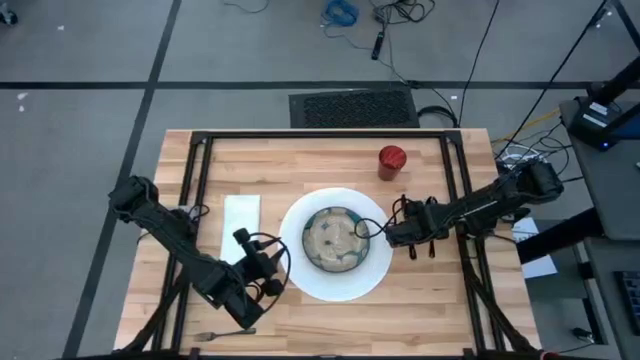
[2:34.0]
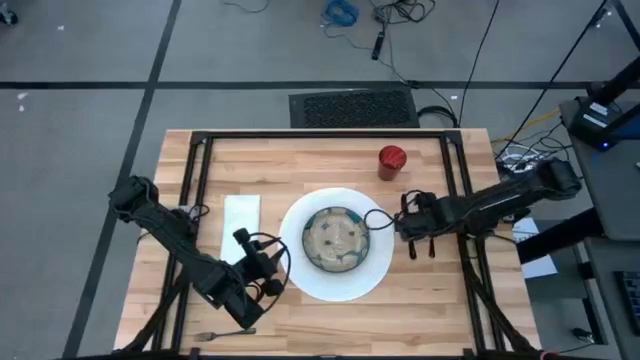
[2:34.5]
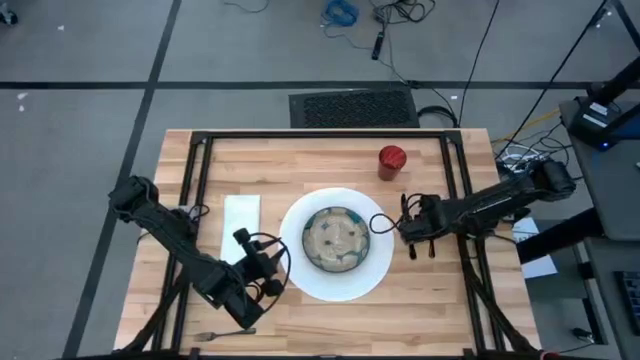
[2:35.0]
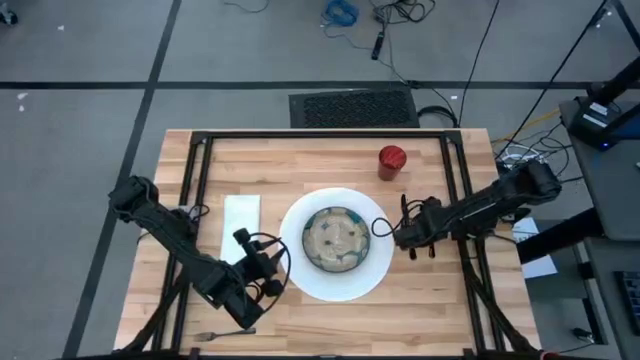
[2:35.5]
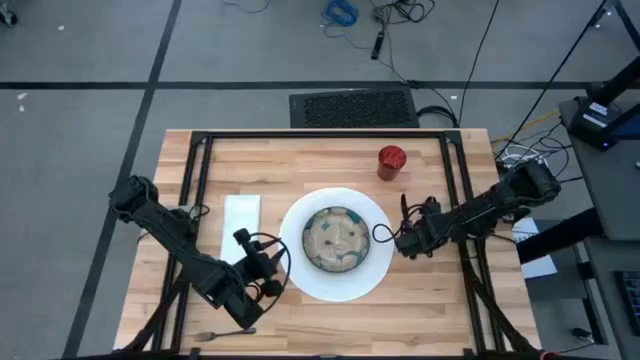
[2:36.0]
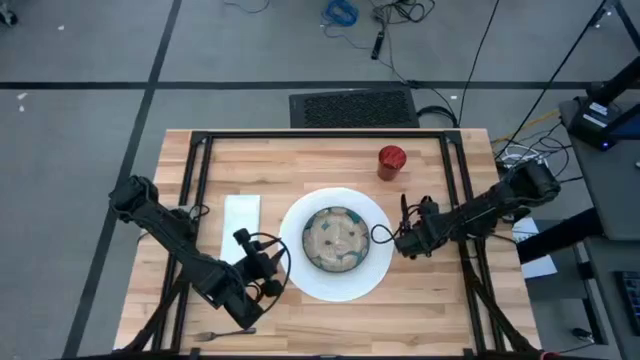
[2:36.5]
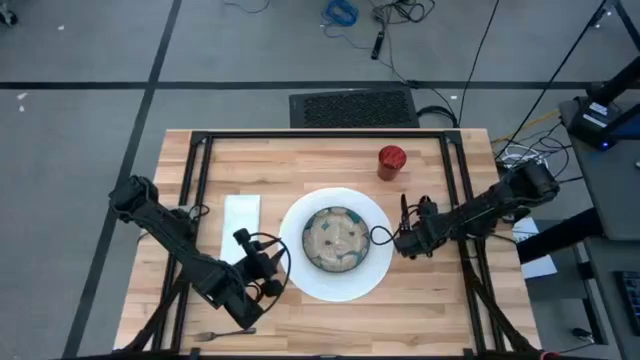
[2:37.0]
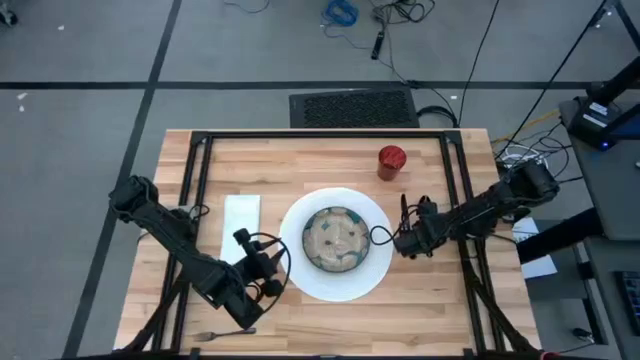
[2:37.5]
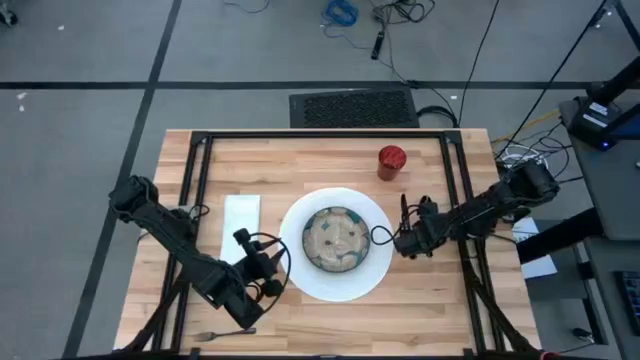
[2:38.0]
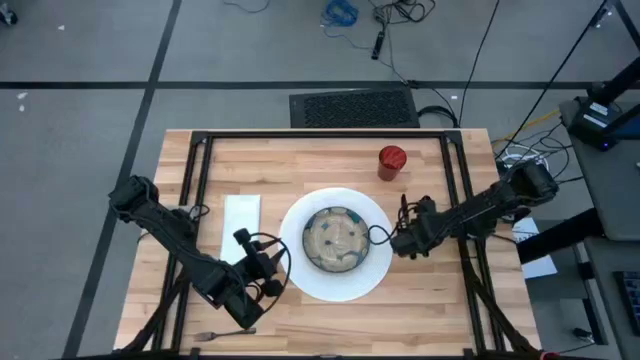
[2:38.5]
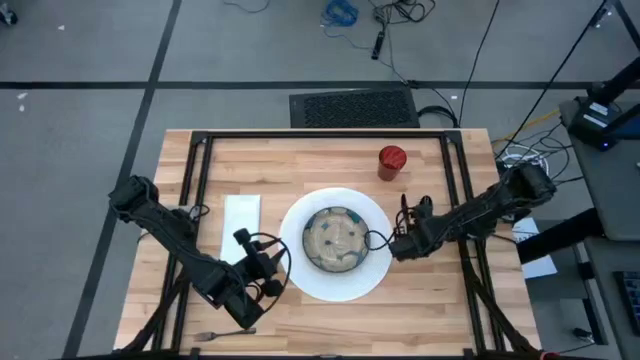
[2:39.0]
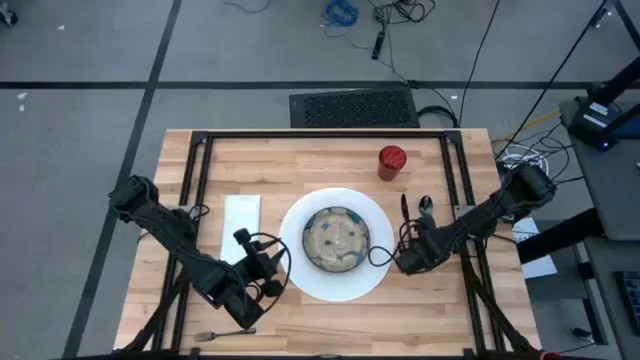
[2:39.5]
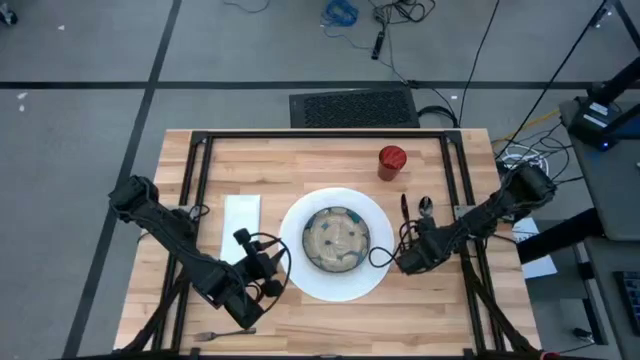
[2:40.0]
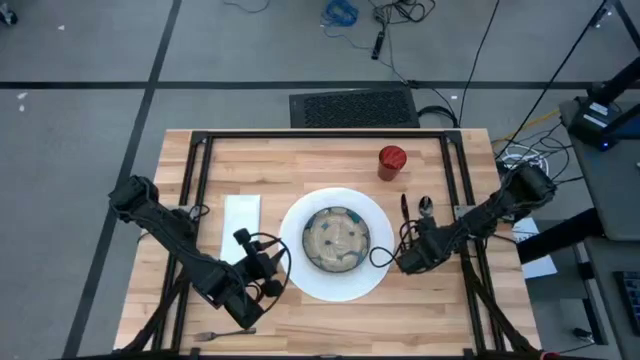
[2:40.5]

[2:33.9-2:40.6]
Task: Set table place
Adjust the black spoon

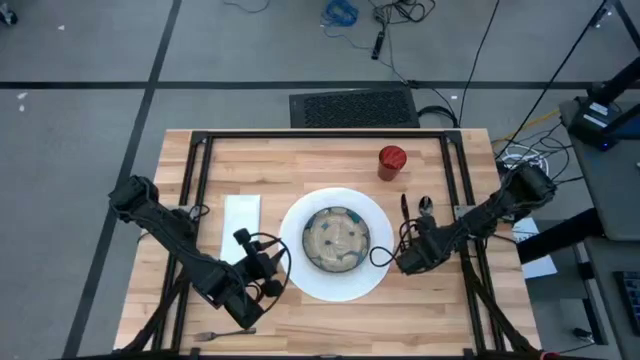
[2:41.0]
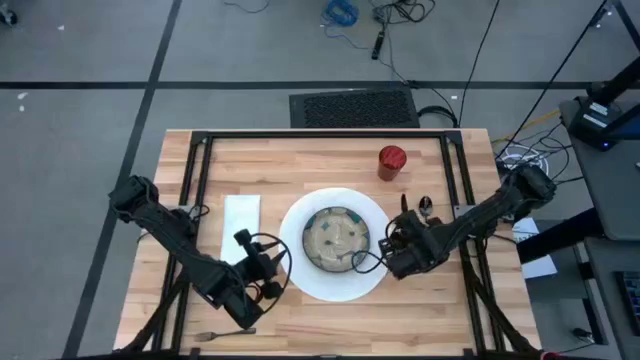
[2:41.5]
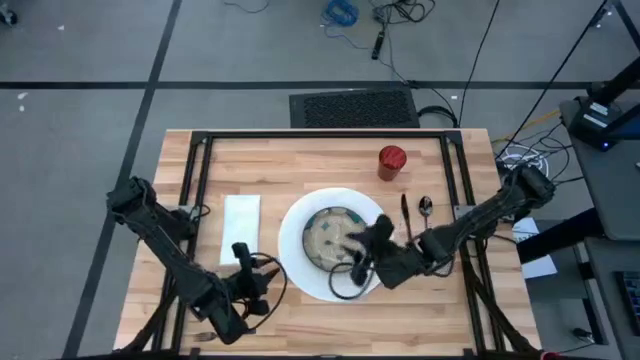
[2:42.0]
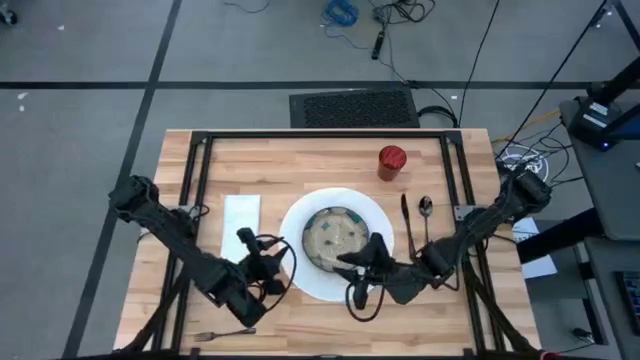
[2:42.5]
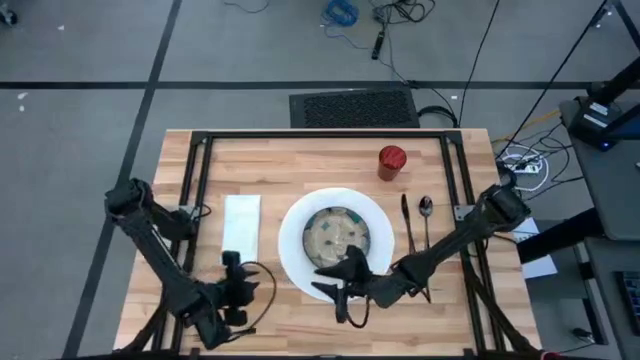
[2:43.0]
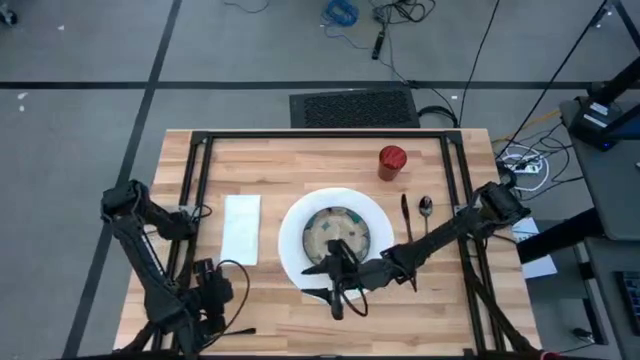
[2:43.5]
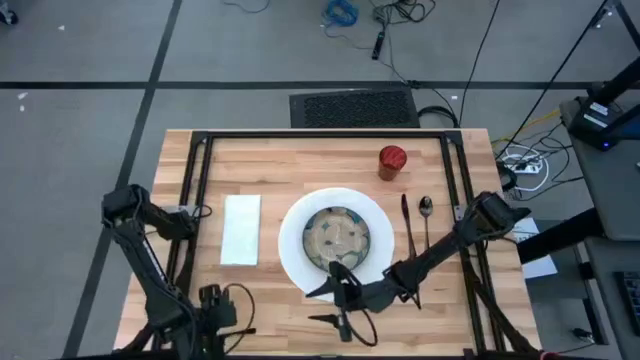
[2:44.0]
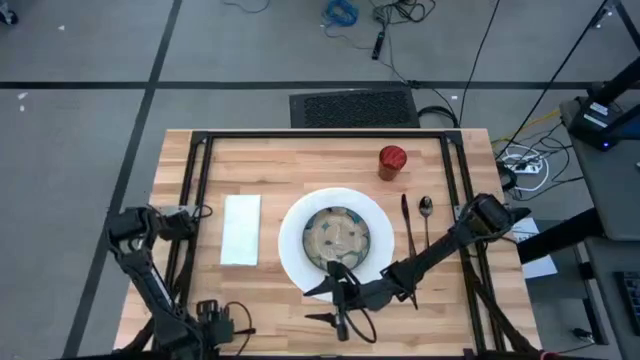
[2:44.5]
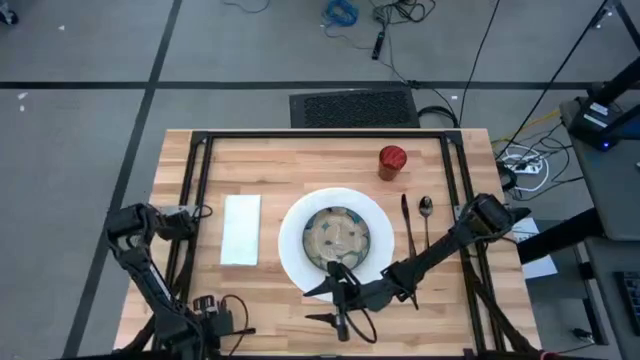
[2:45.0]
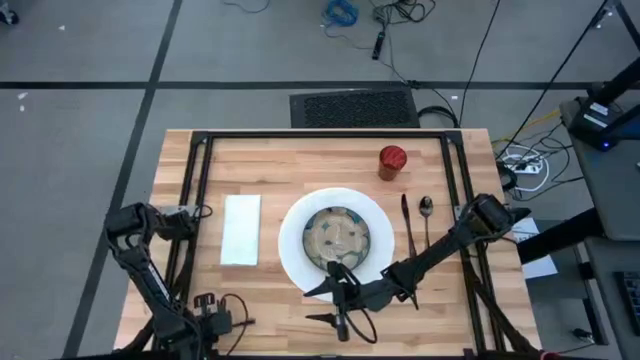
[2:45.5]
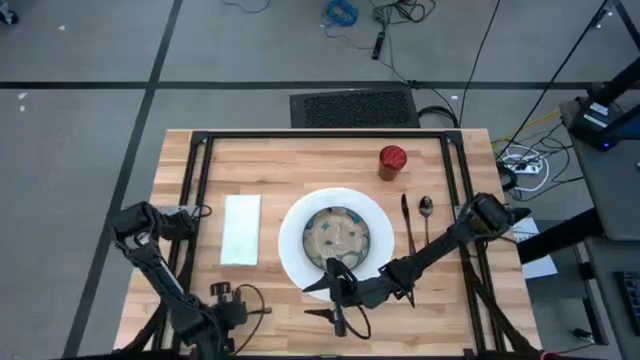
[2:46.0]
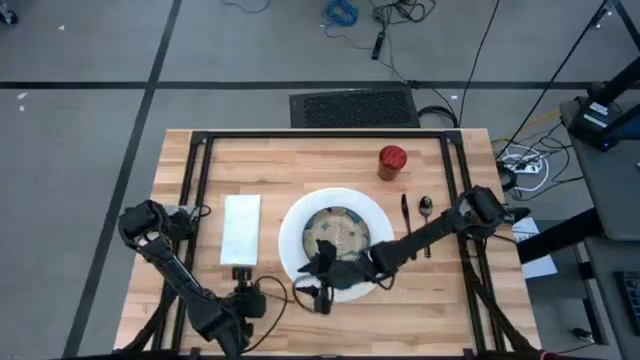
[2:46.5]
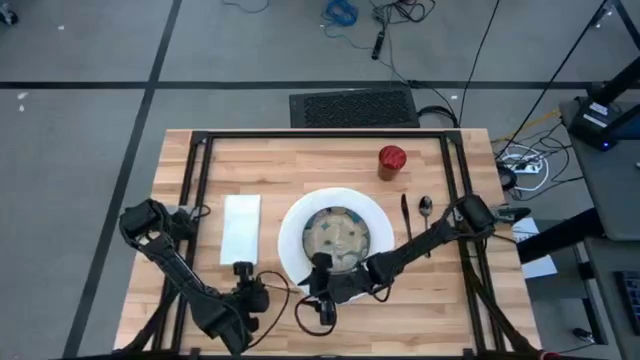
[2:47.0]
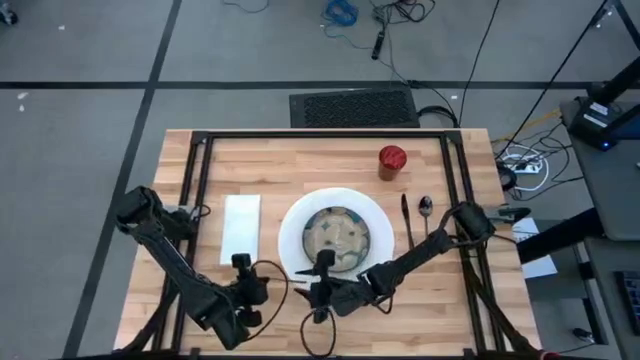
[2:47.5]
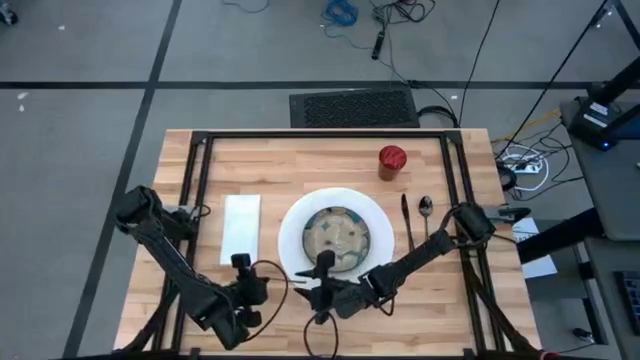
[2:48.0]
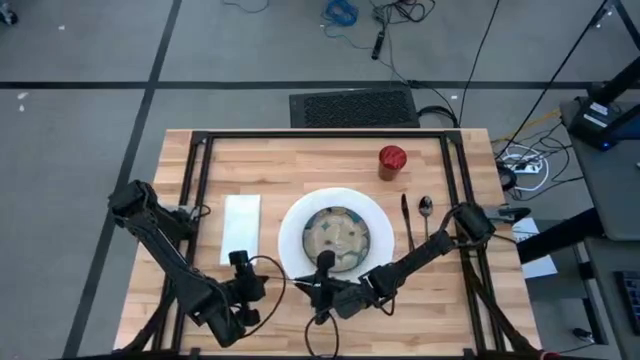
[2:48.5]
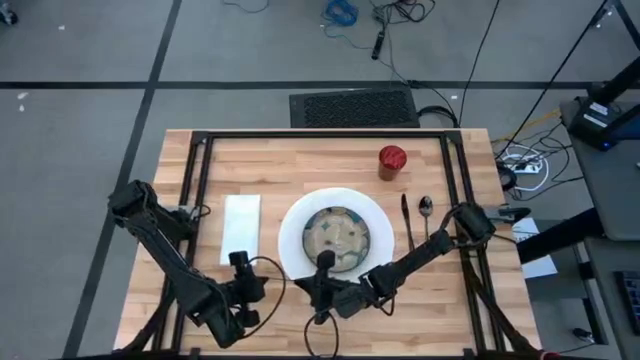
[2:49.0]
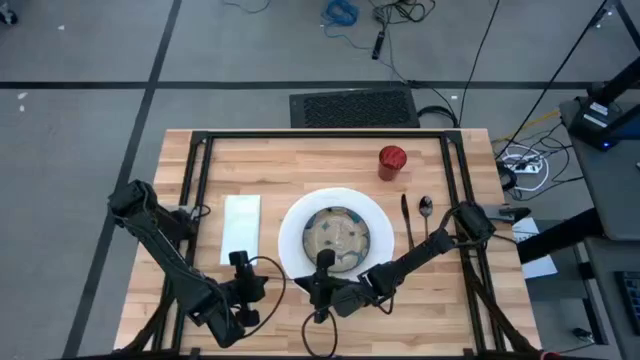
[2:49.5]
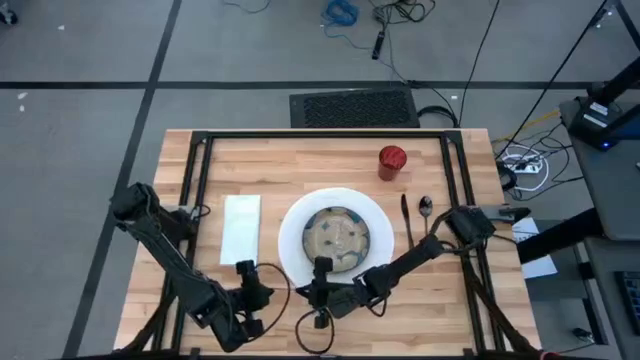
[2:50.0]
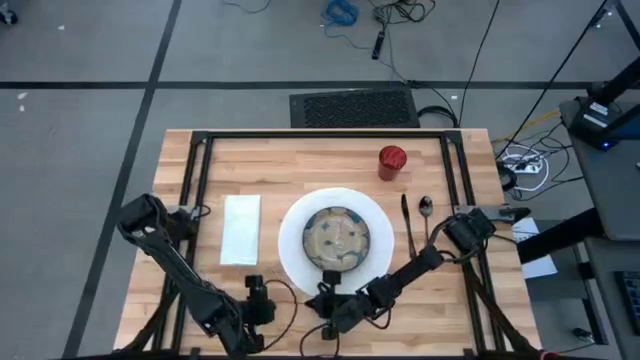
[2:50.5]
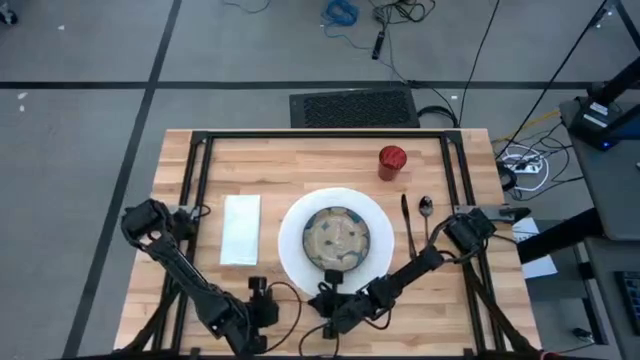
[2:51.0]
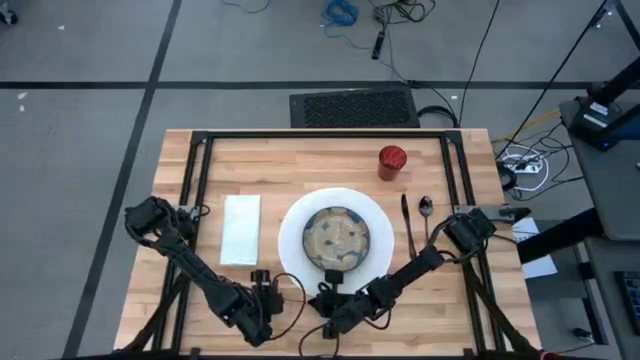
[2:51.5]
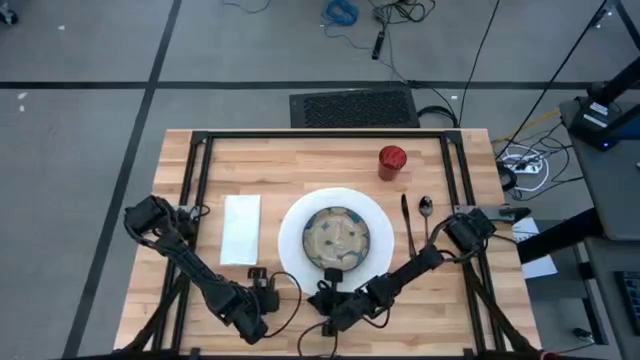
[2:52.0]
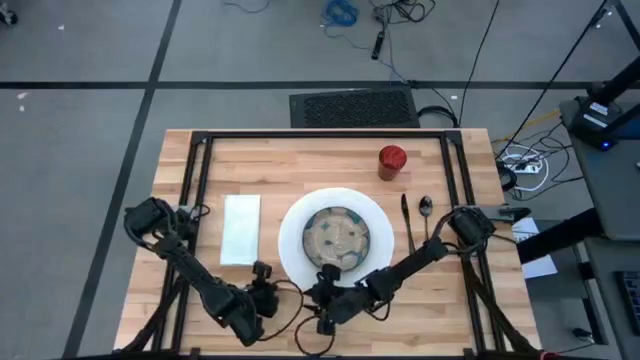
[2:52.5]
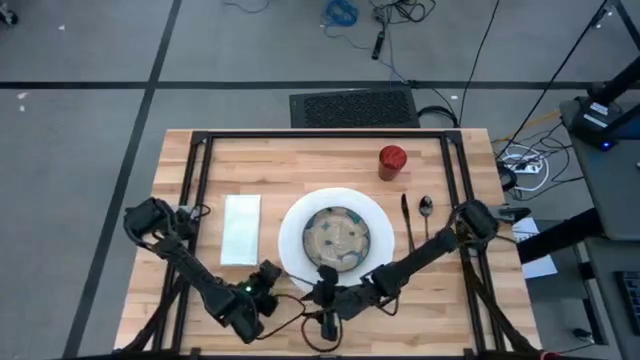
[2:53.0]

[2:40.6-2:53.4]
Put the black fork on the white napkin
